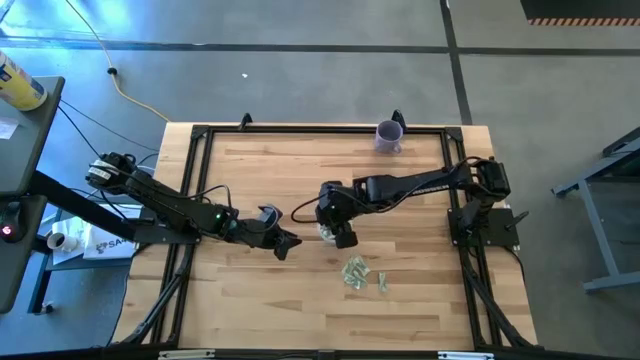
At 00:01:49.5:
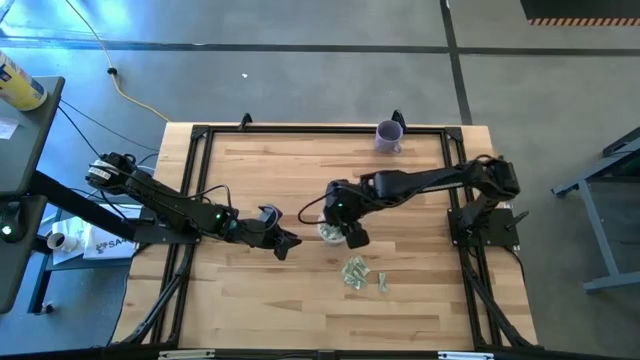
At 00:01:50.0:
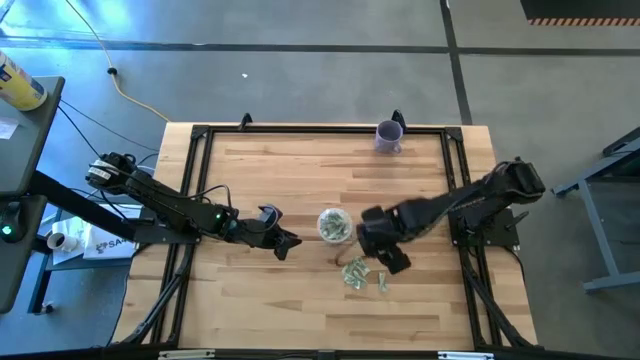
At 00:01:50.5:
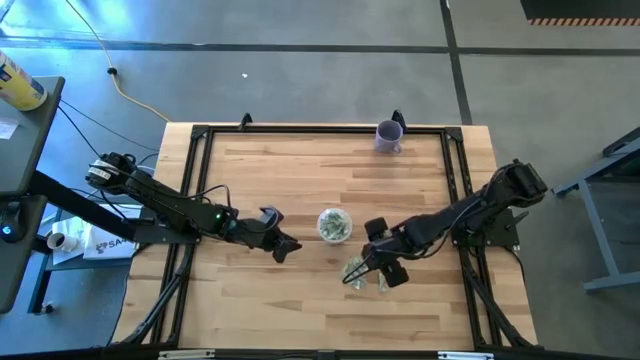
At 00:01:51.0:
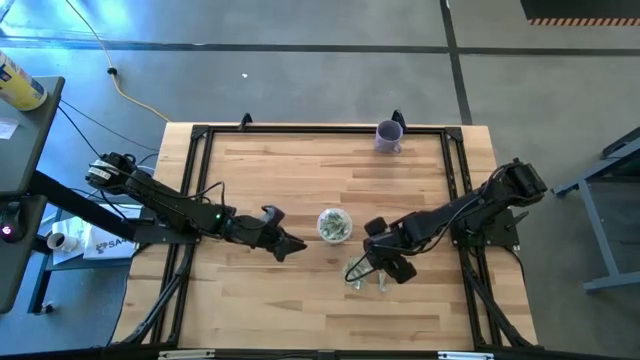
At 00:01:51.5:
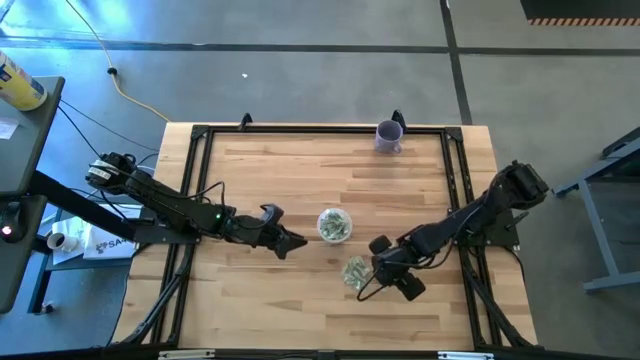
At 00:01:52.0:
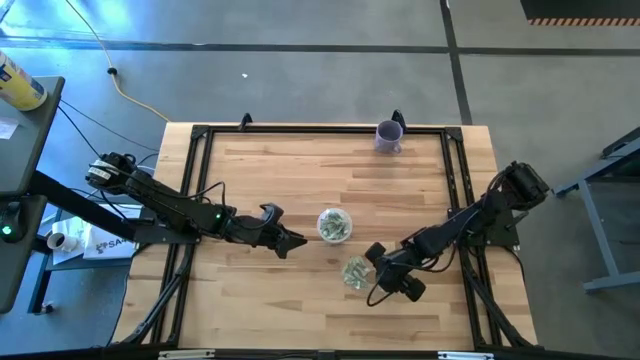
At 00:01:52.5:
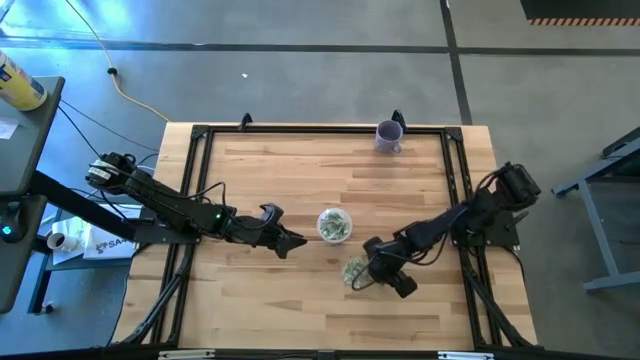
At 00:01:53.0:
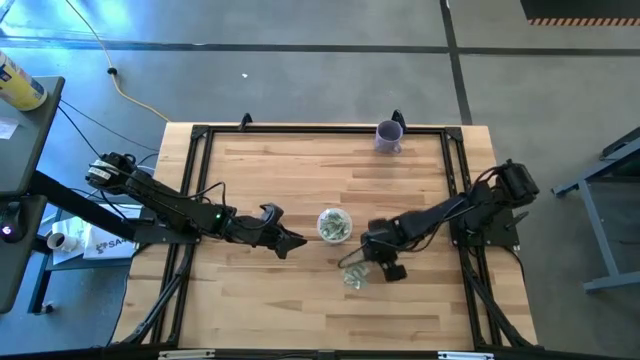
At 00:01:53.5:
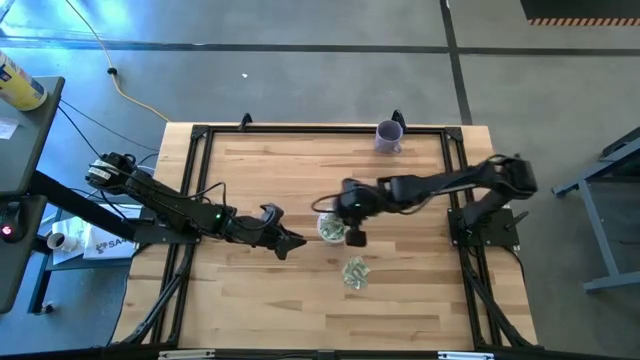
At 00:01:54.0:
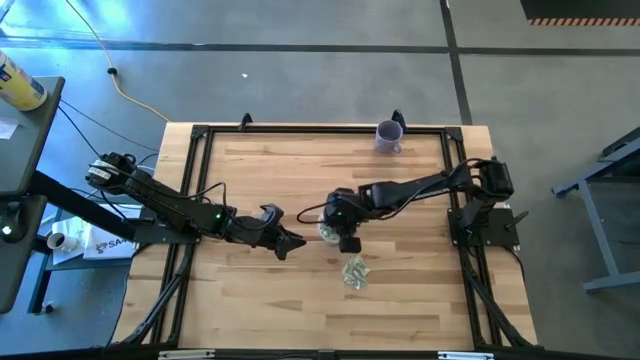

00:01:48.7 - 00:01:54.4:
Task: Pick and place Stevia / Truvia into bins
Put the green stevia packet into the transparent bin

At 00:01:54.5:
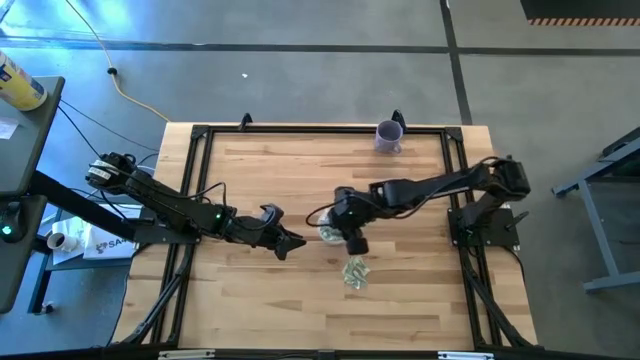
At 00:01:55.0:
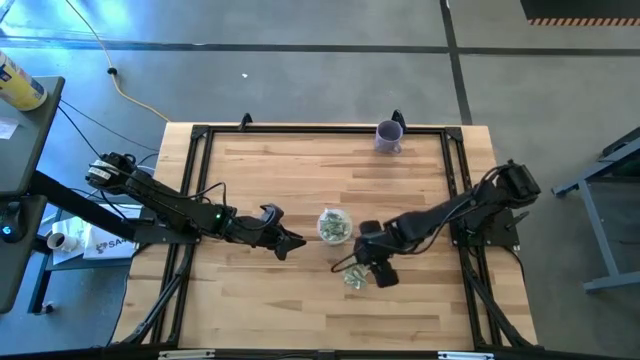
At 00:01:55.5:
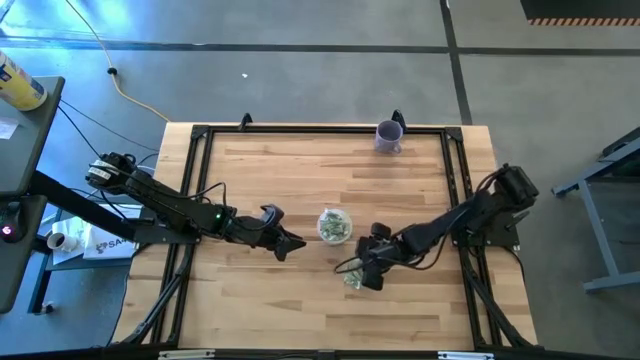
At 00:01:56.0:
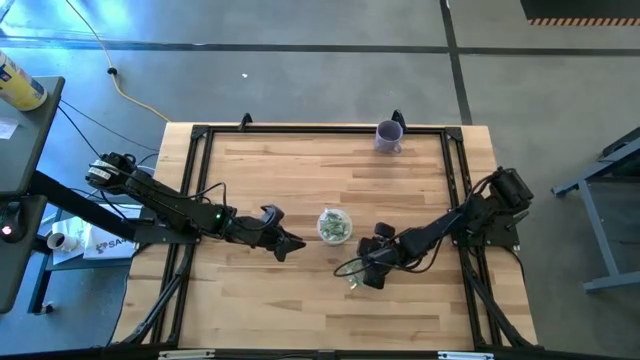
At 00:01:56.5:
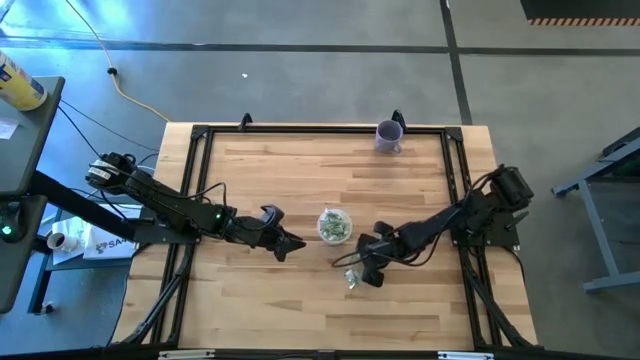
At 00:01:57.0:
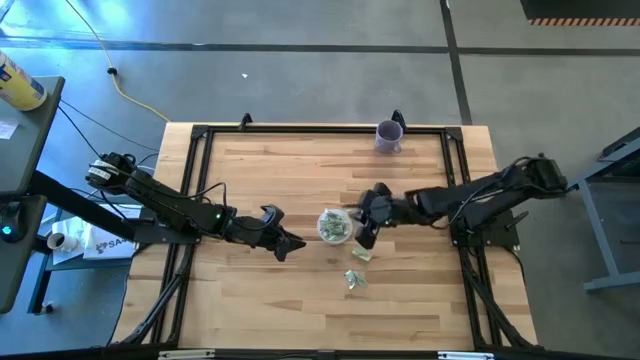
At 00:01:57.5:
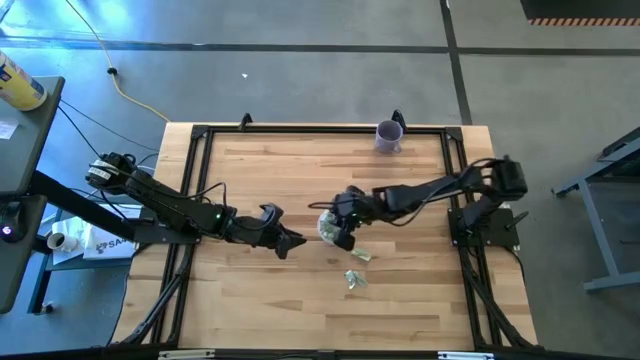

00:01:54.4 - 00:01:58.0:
Put the green stevia packet into the transparent bin

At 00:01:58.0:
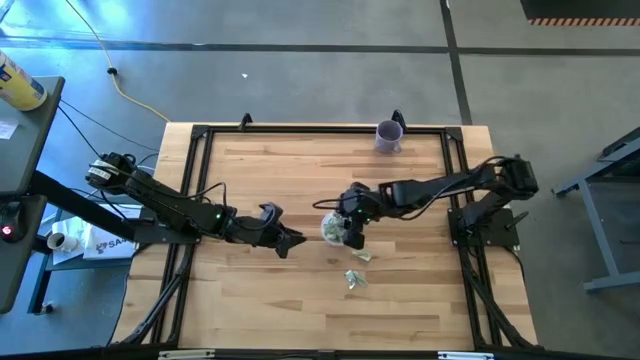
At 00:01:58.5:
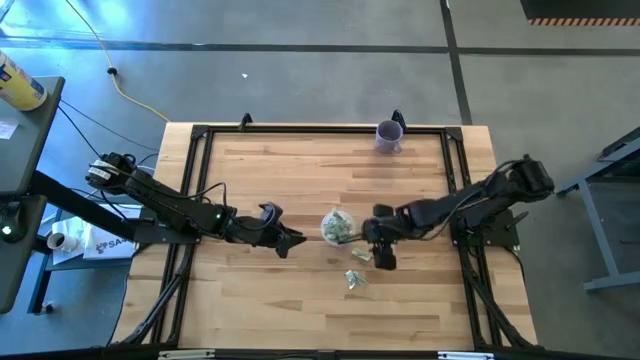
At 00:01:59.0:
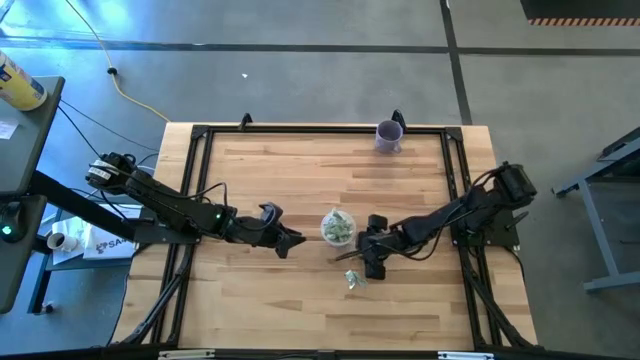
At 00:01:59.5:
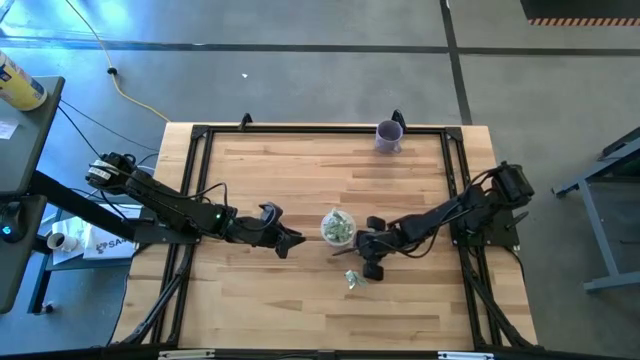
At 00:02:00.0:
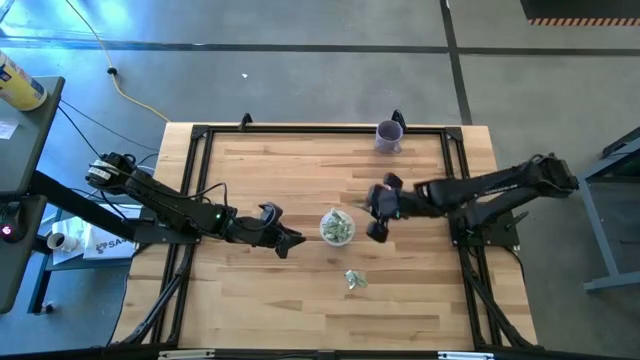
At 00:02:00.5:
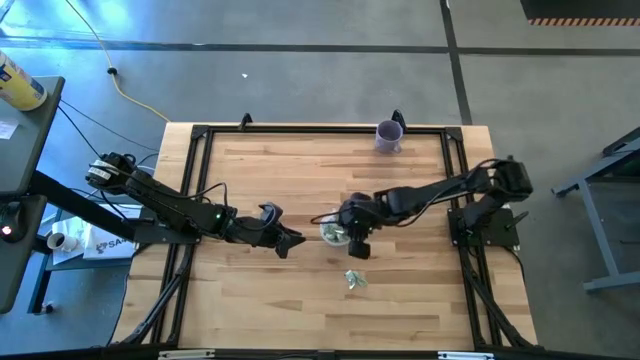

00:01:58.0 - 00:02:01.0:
Put the green stevia packet into the transparent bin

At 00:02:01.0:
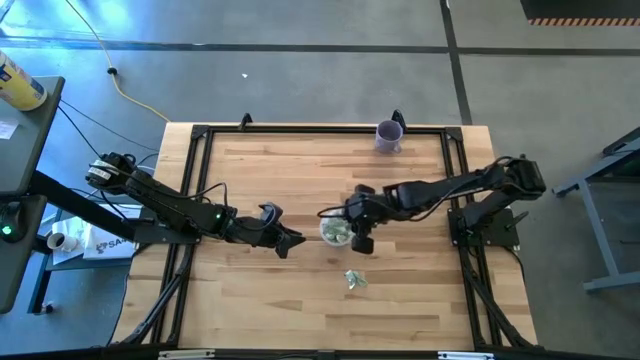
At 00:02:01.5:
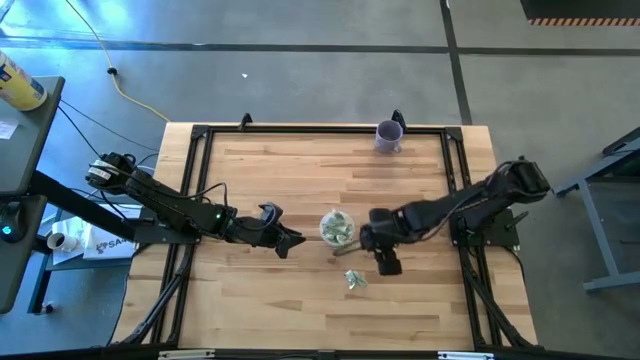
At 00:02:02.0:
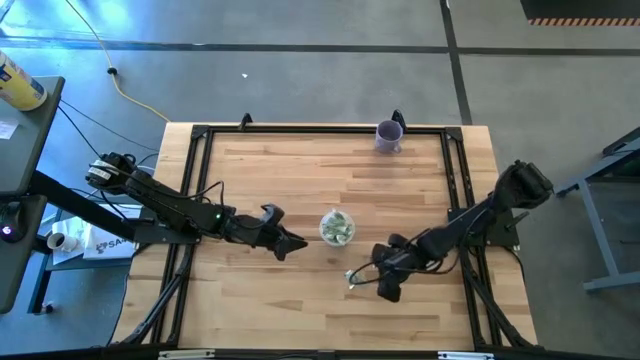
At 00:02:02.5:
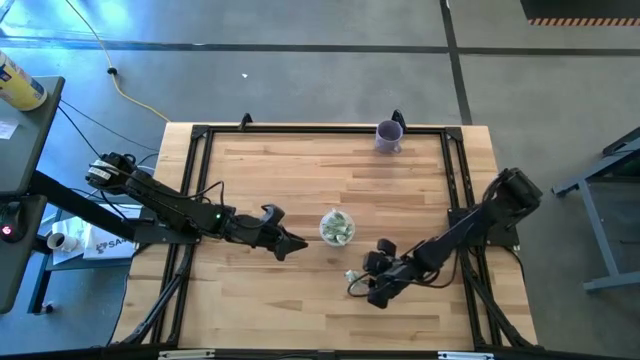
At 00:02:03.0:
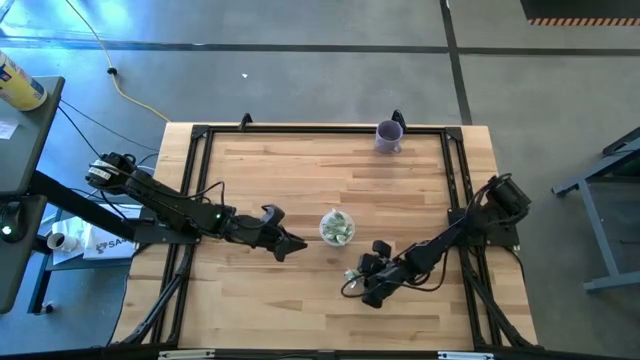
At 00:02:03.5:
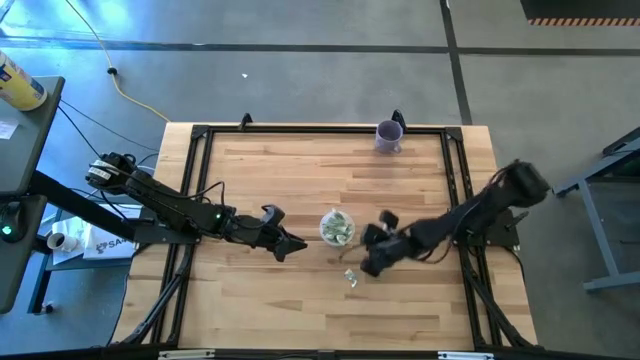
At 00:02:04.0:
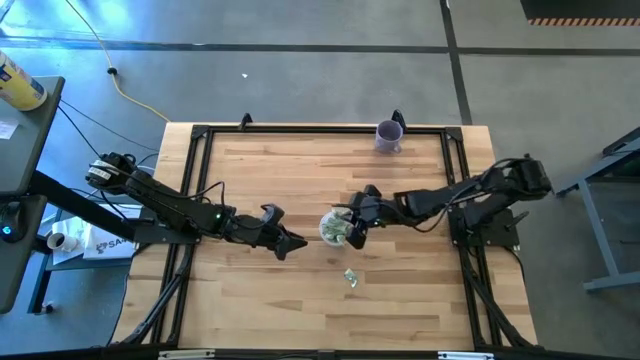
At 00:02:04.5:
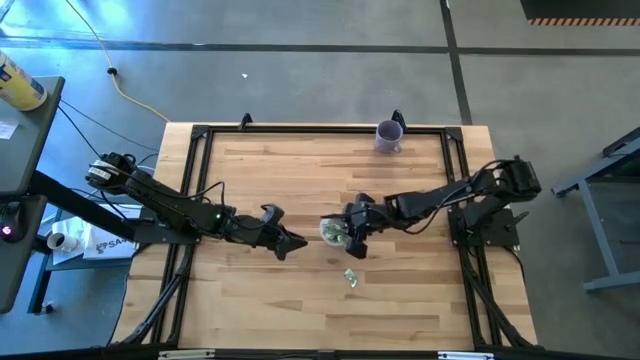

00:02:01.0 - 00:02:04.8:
Put the green stevia packet into the transparent bin

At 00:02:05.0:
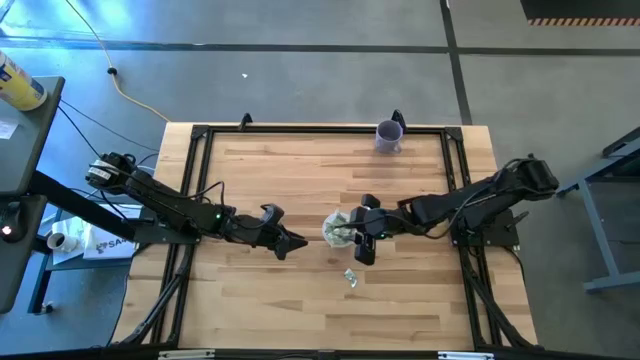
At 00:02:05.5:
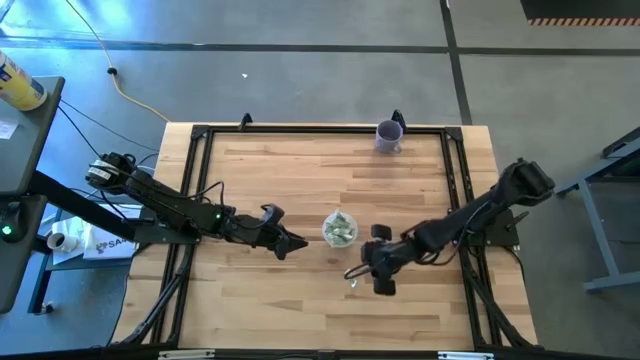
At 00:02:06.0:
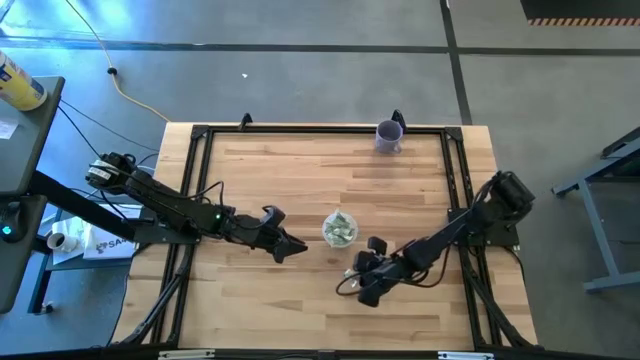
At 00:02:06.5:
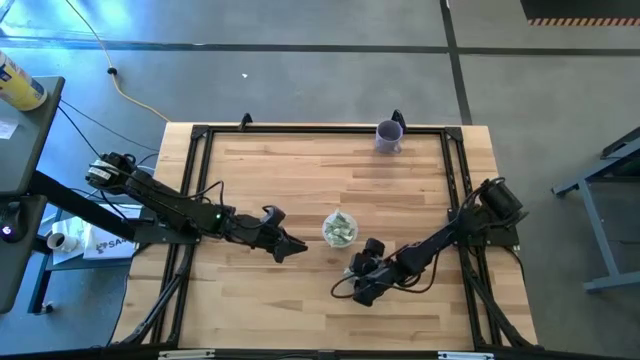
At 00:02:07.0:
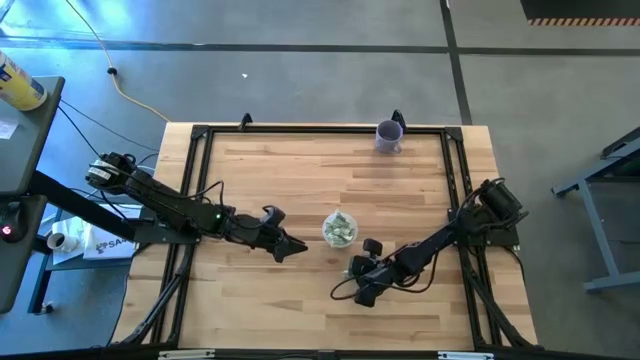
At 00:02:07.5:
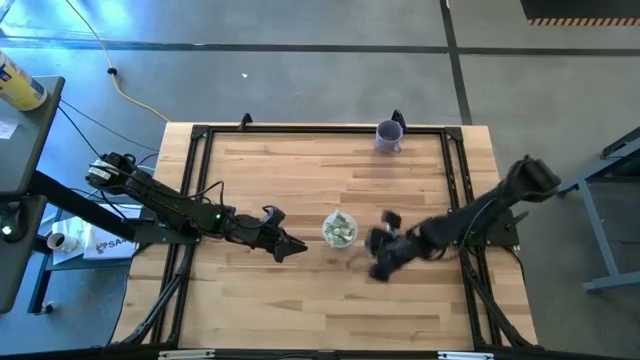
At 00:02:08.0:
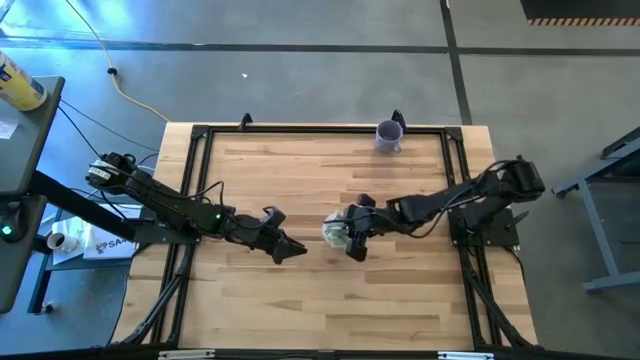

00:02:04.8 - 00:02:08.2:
Put the green stevia packet into the transparent bin

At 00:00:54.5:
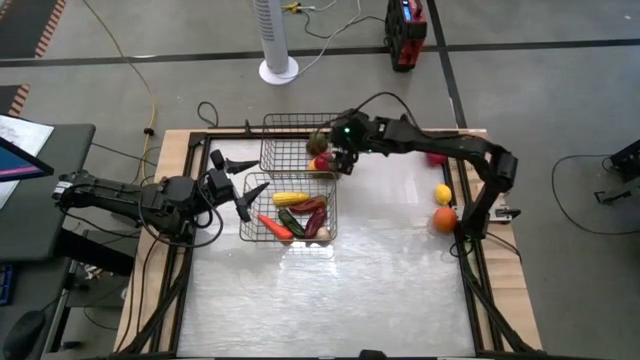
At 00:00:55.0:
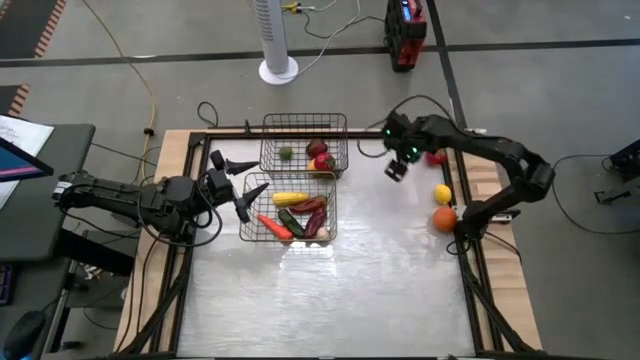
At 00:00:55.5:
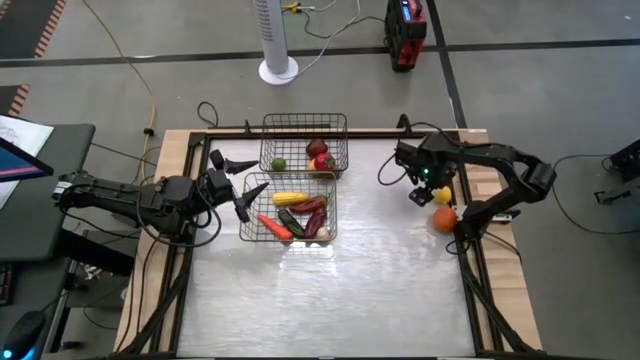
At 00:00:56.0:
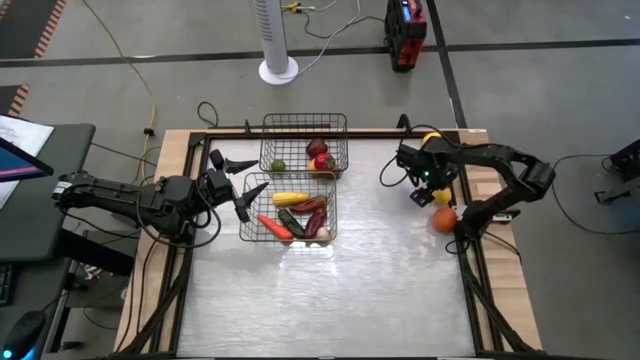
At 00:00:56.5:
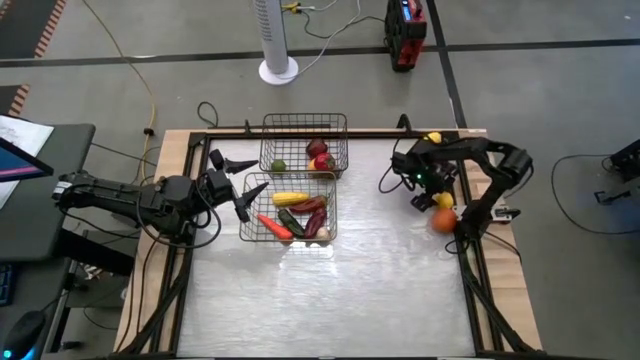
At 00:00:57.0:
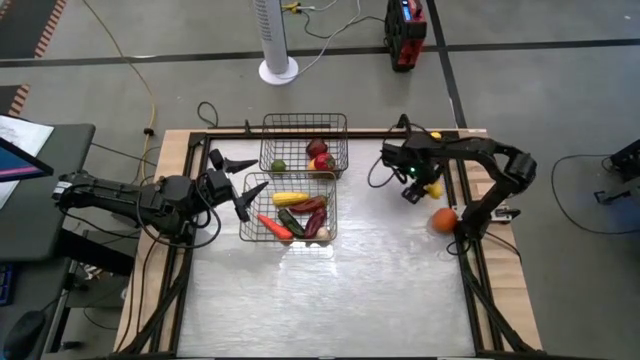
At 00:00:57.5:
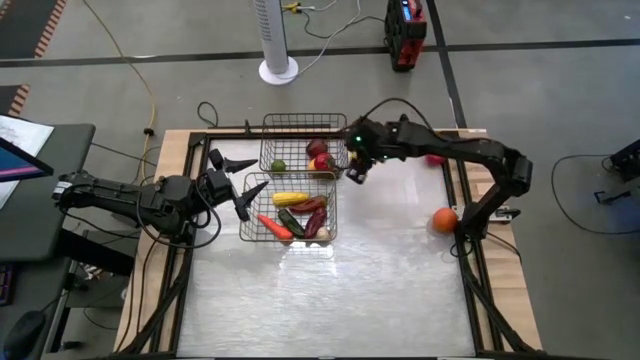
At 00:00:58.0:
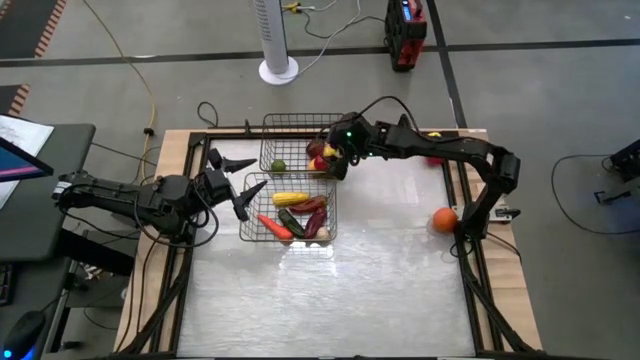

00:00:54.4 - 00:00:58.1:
Task: Sort produce into baskets
Put the lemon into the top wire basket
